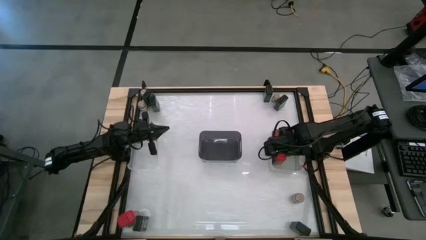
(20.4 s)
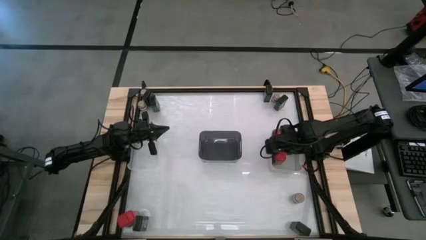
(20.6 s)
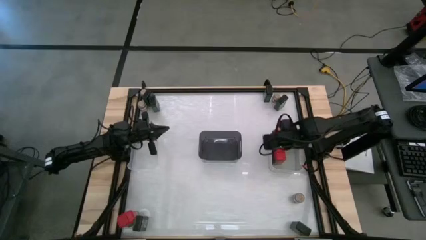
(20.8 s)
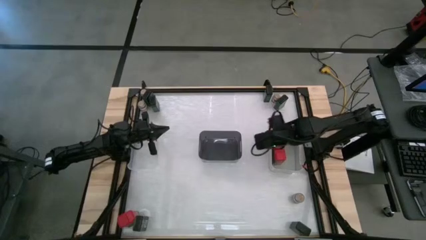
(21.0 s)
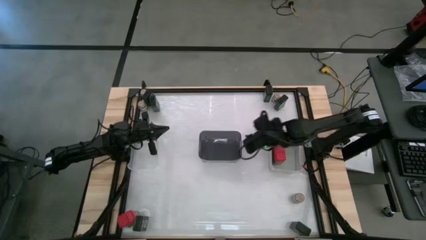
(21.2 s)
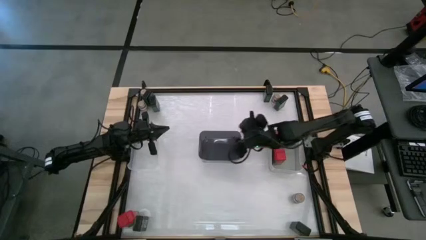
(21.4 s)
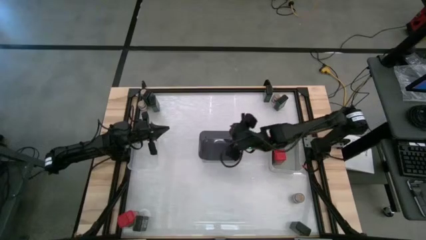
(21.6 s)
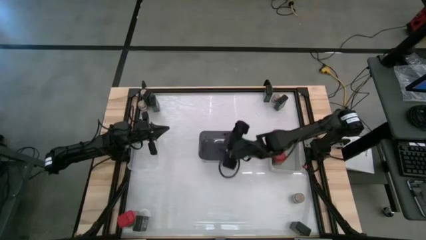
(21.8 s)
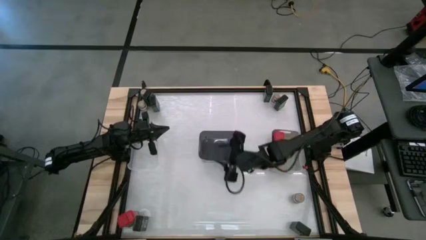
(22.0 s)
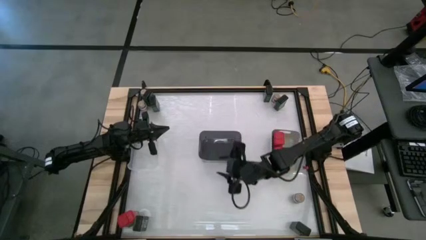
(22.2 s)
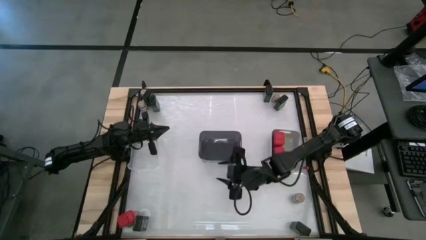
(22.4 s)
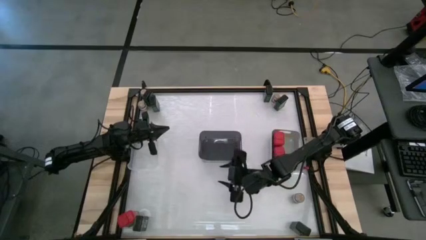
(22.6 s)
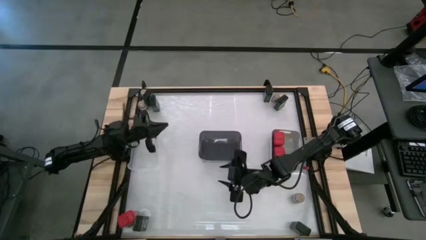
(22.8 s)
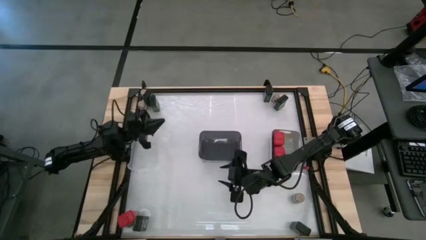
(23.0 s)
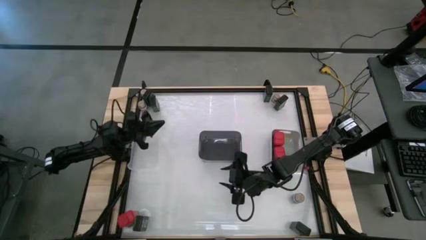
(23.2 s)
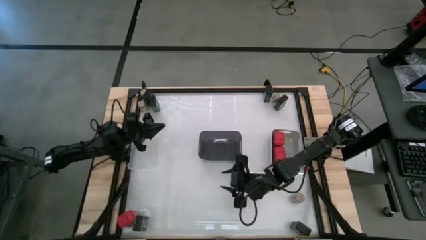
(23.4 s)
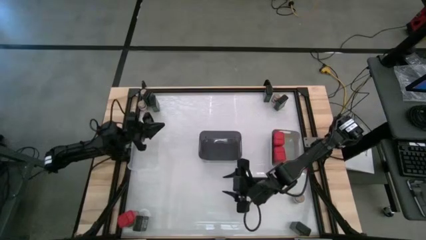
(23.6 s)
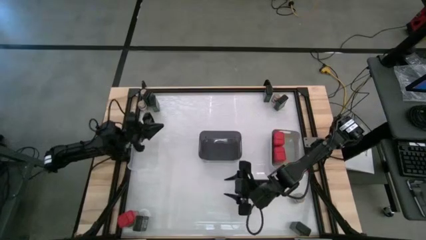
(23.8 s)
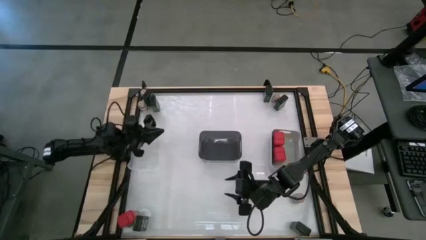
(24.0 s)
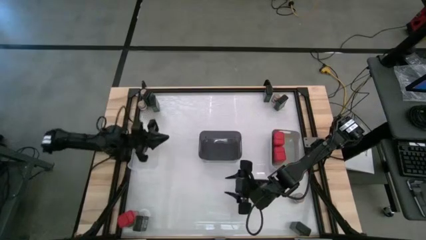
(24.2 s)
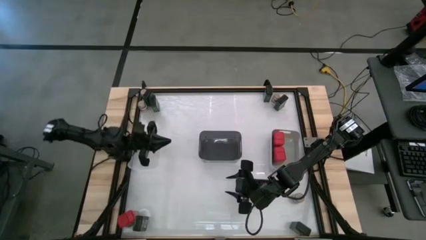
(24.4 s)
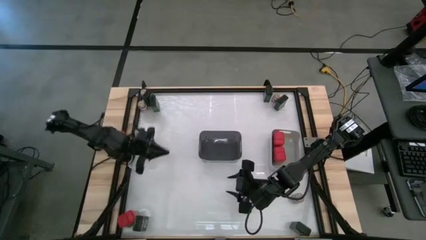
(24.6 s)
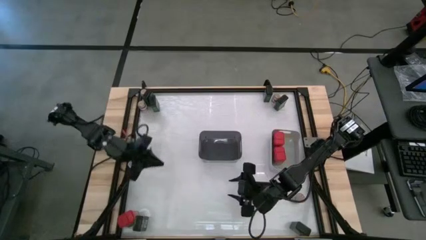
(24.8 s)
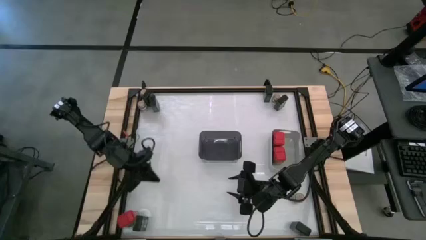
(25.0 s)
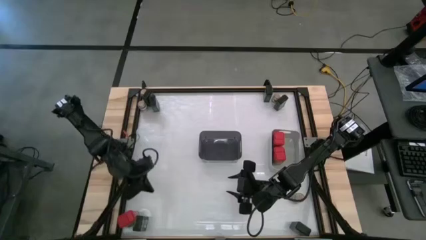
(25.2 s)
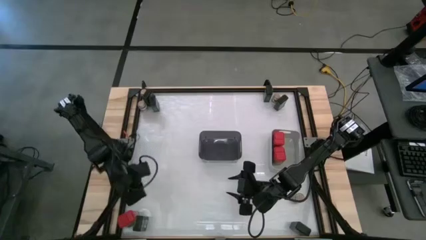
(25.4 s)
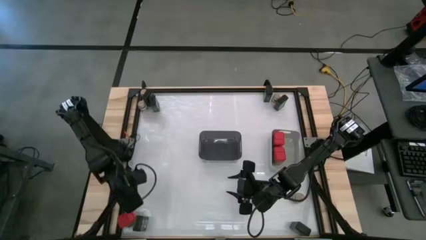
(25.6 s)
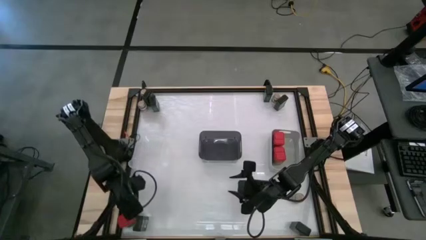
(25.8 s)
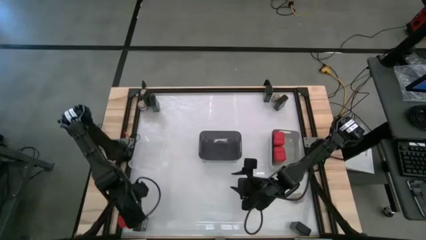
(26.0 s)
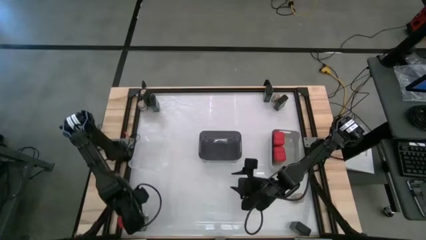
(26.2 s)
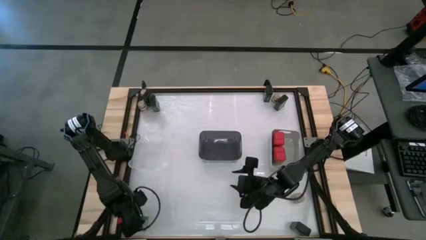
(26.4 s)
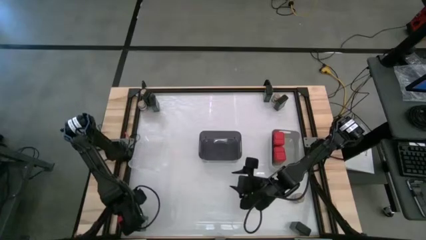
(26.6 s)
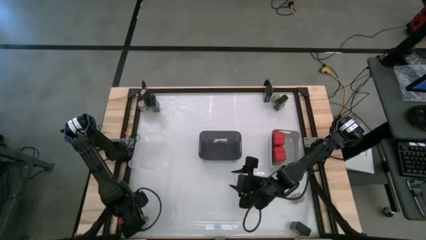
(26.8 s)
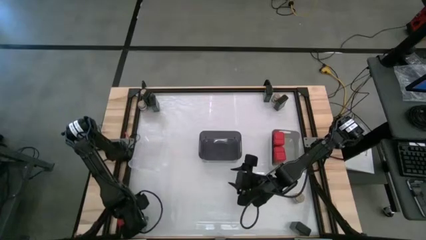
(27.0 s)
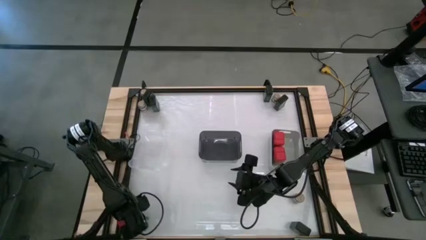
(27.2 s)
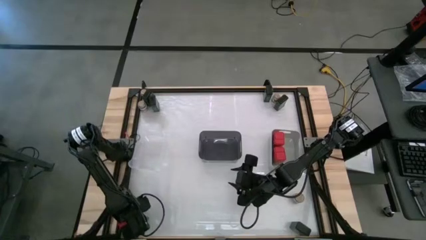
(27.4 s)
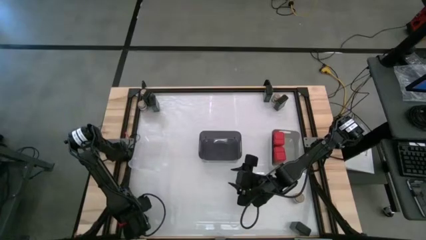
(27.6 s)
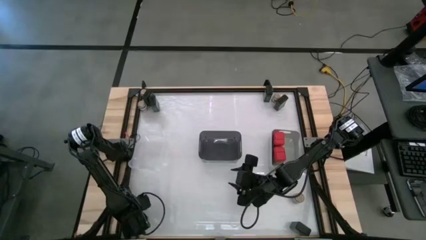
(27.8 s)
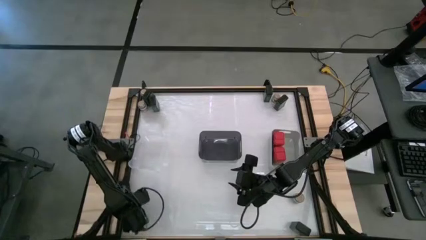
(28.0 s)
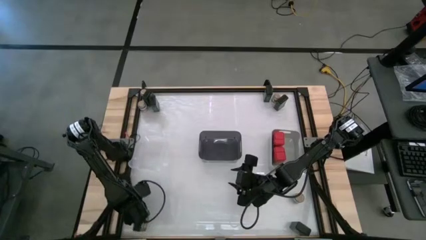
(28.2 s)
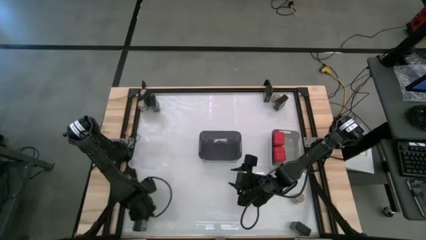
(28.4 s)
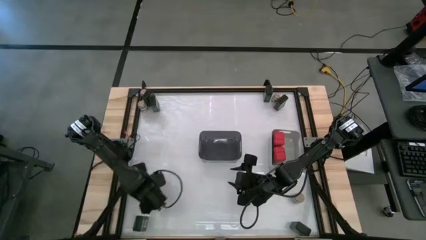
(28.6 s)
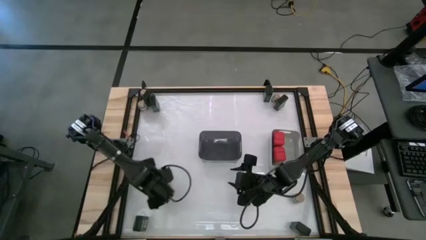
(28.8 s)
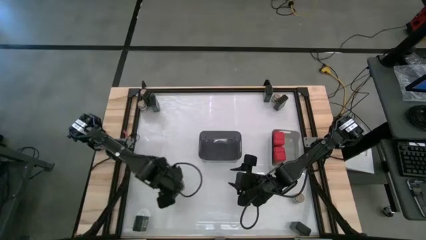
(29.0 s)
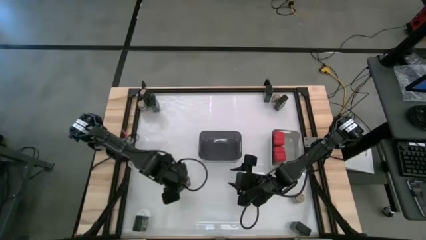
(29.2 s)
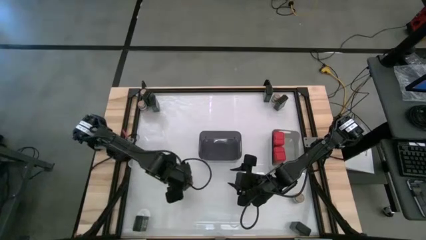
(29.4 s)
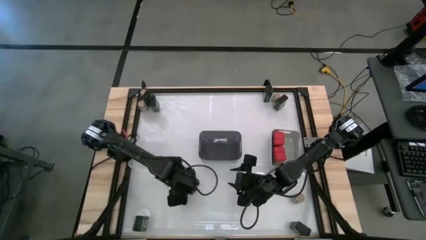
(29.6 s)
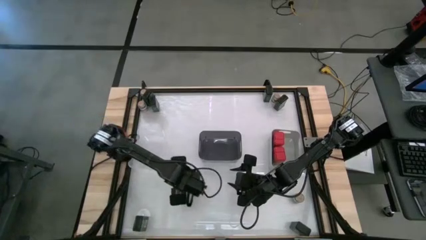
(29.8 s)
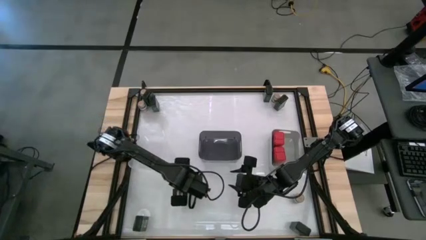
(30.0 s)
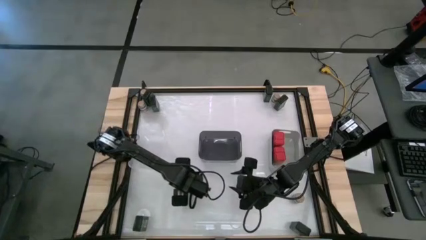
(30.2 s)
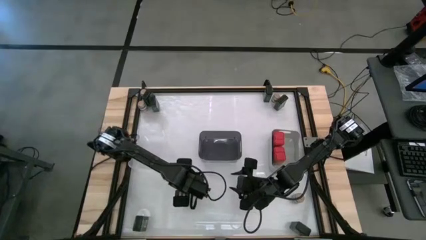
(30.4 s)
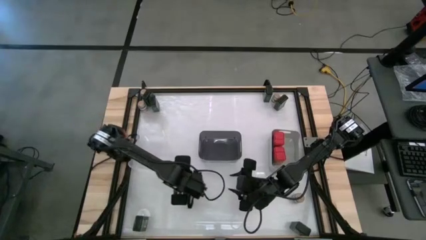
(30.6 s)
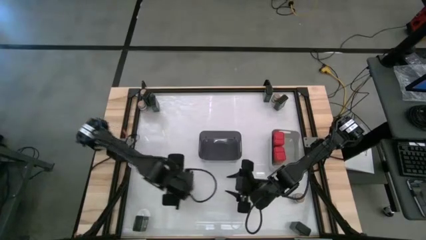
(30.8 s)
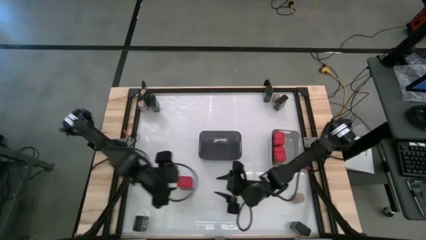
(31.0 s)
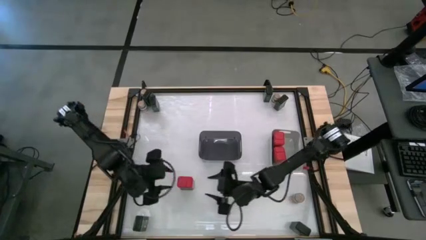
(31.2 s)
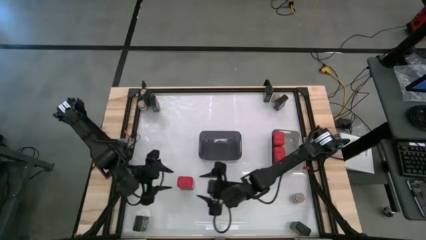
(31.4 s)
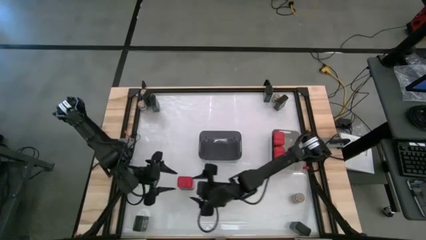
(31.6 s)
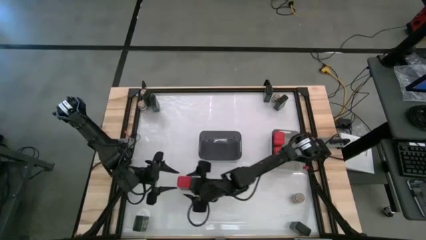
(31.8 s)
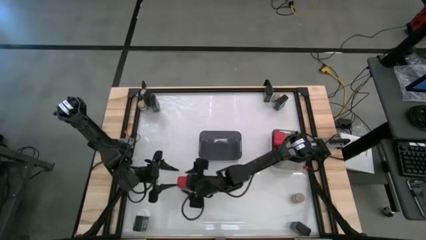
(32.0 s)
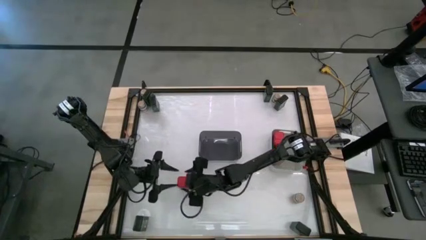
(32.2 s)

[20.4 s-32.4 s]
Task: Sort spices by type
Put the red spice can into the white bin
